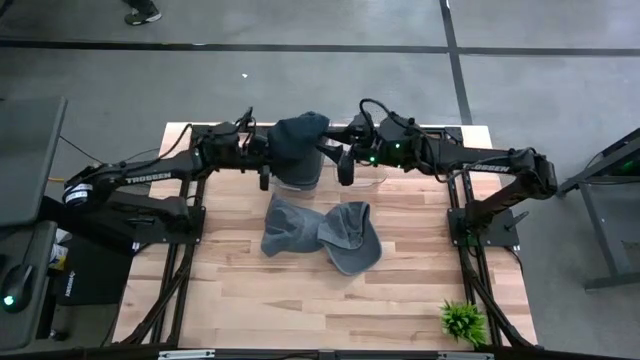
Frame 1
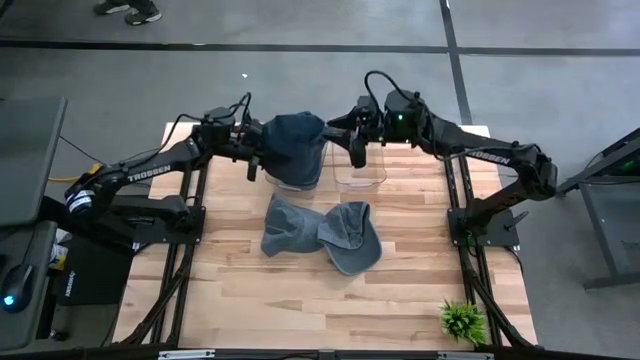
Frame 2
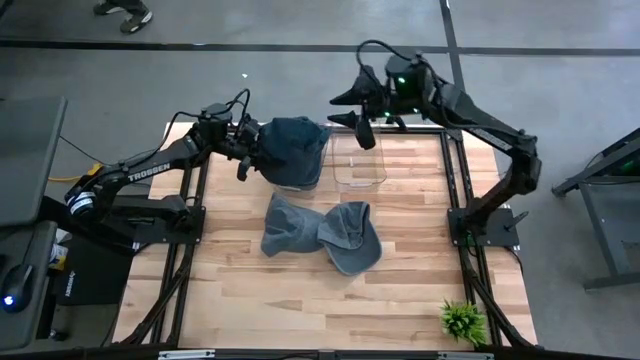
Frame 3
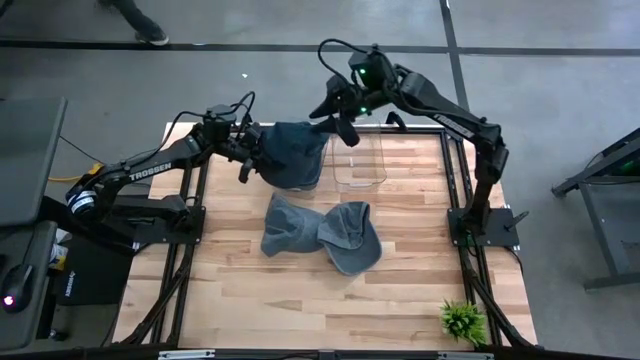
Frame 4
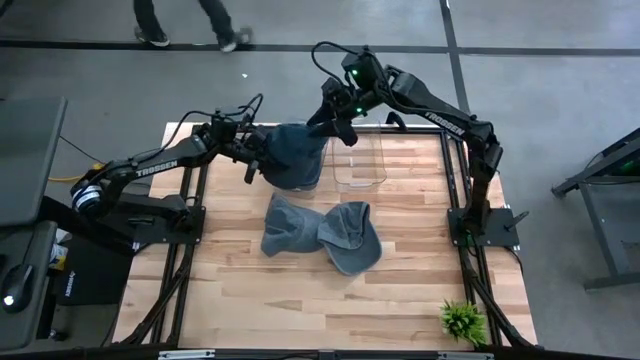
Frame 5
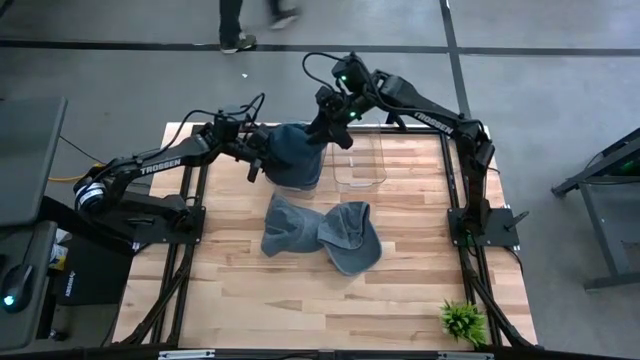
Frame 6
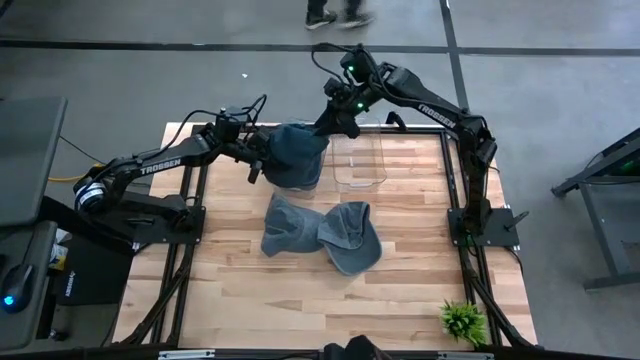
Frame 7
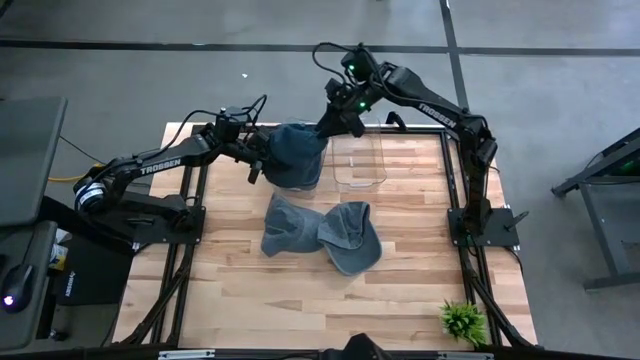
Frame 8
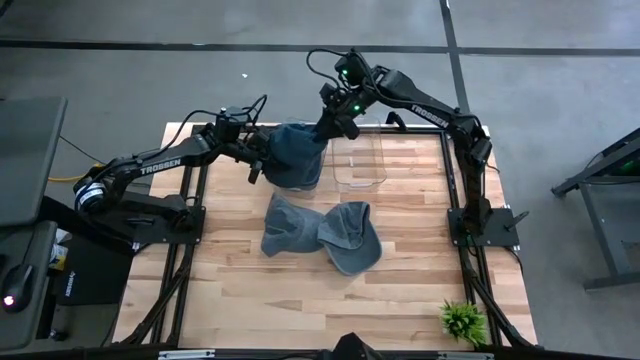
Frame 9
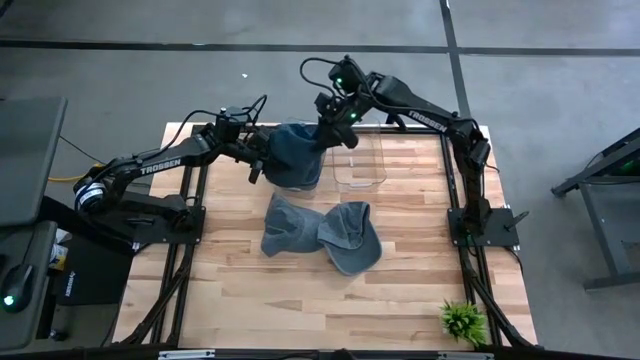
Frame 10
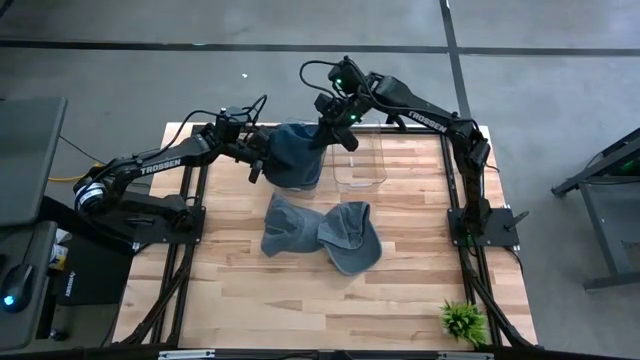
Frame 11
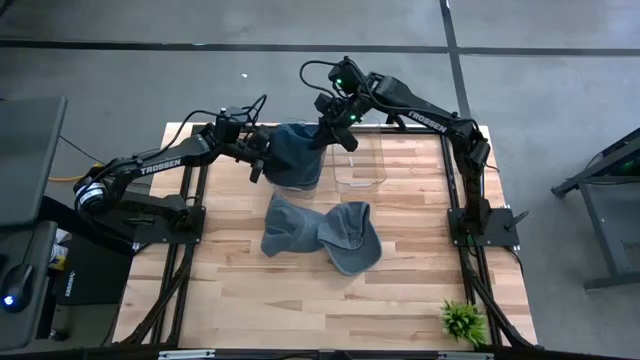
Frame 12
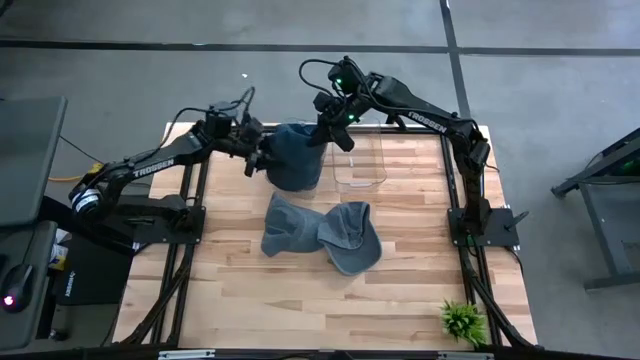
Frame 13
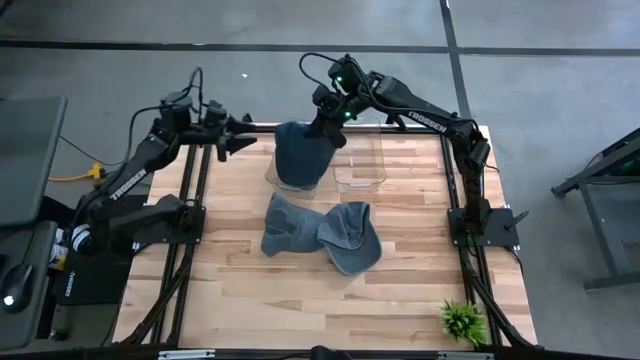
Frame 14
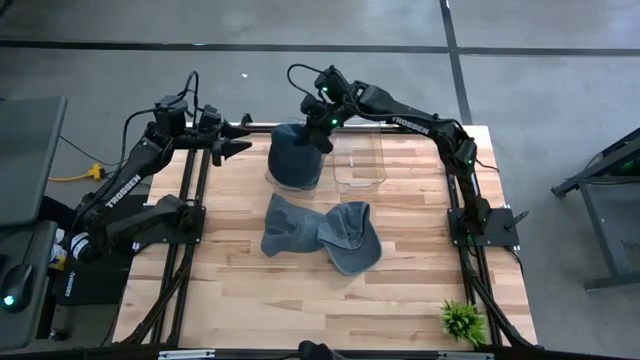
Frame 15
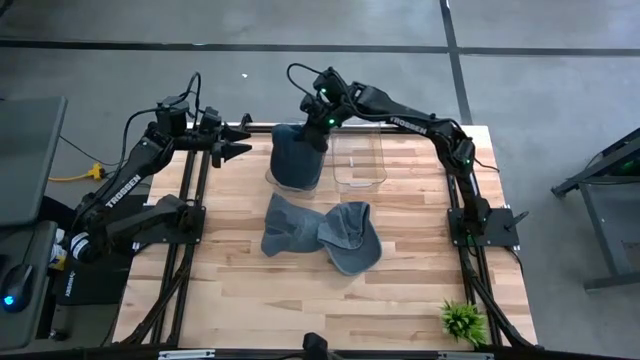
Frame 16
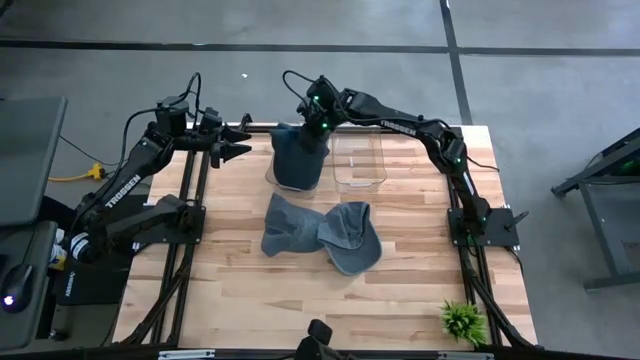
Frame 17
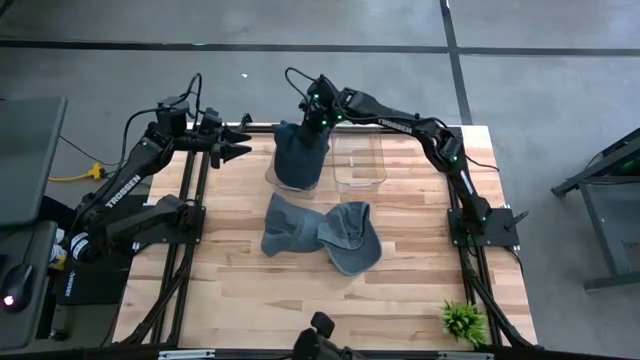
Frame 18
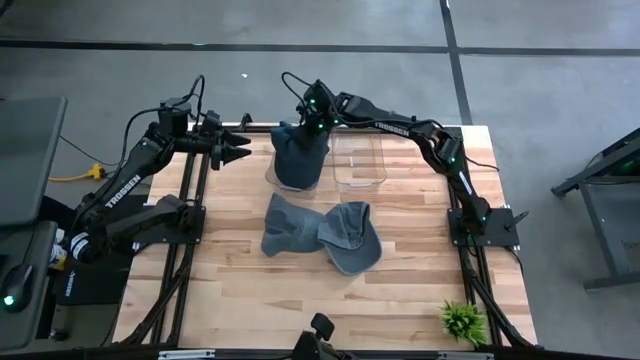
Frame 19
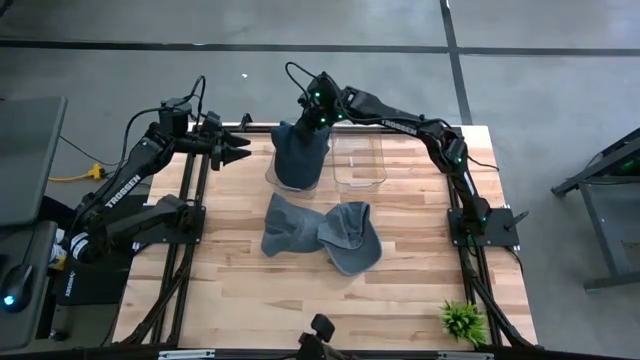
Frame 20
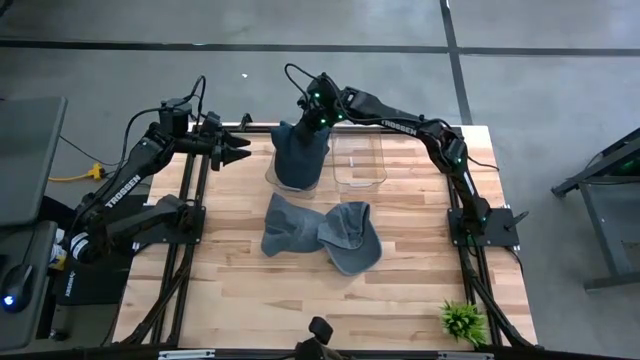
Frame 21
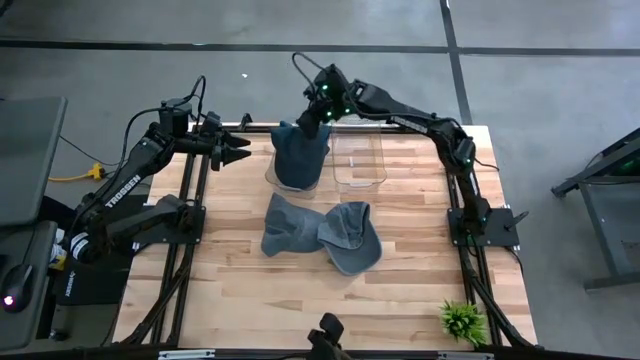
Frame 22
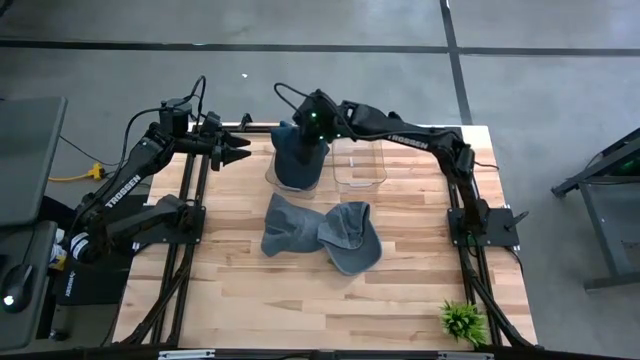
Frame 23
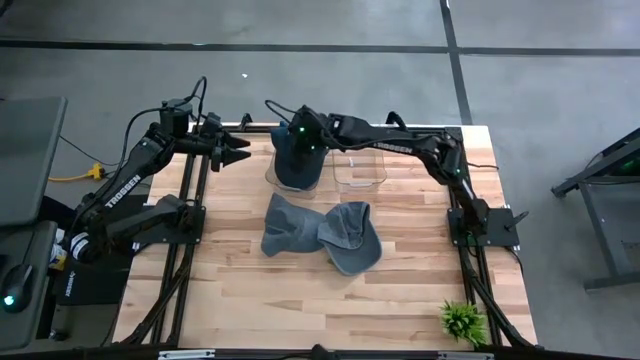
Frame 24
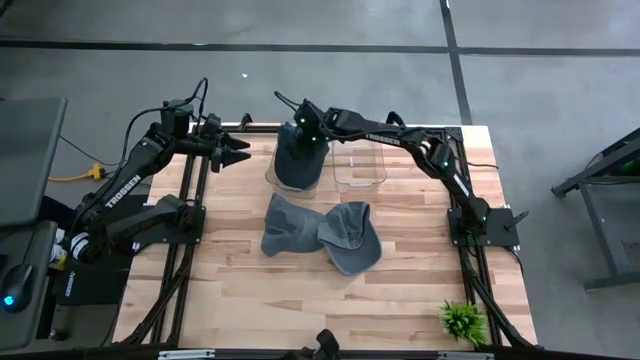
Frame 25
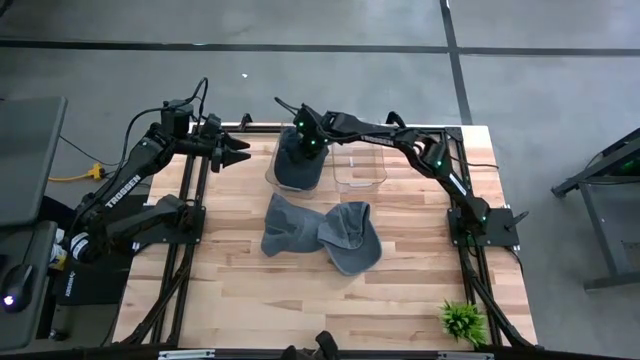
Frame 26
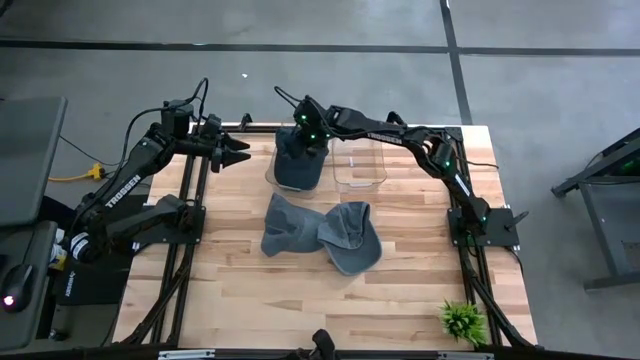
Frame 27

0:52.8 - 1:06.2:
Task: Pick & Place hat
Put the blue cap into the left transparent bin

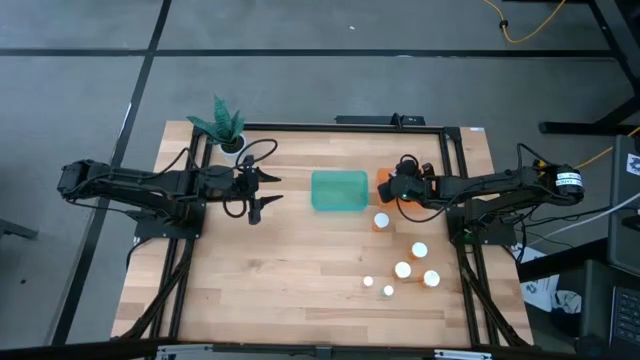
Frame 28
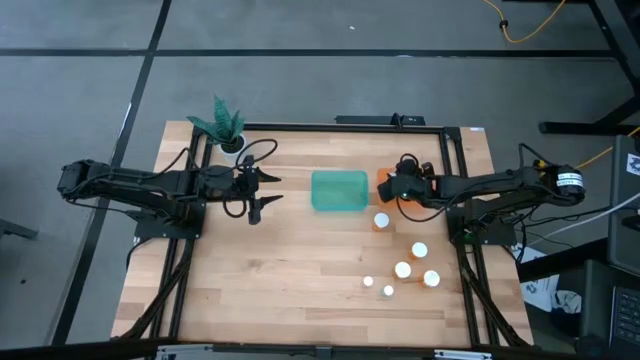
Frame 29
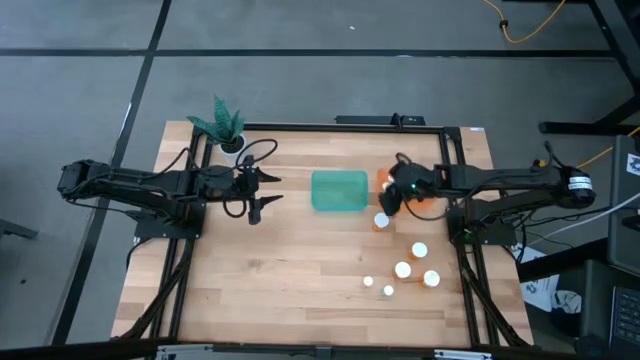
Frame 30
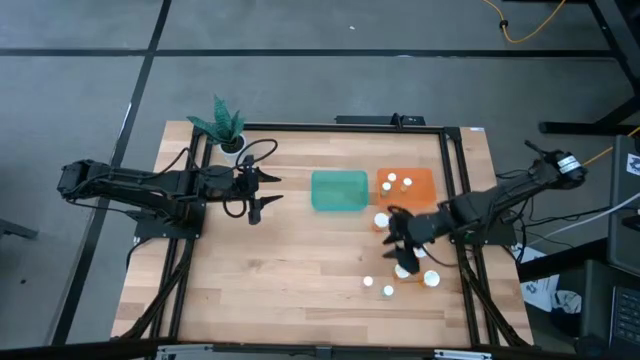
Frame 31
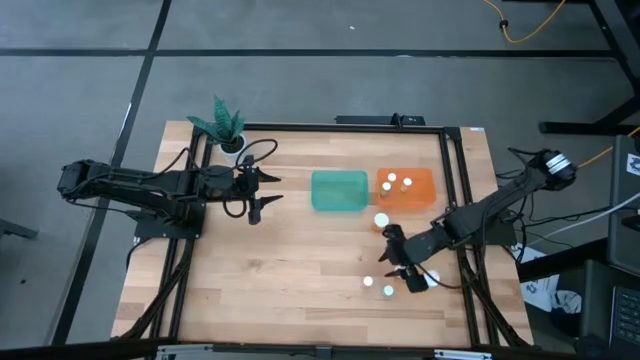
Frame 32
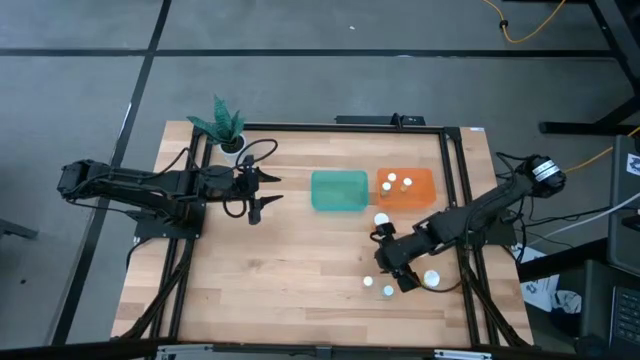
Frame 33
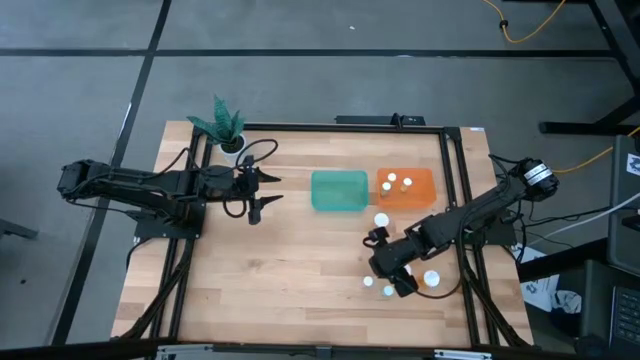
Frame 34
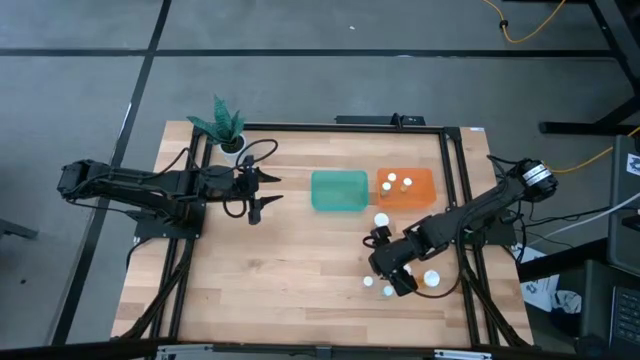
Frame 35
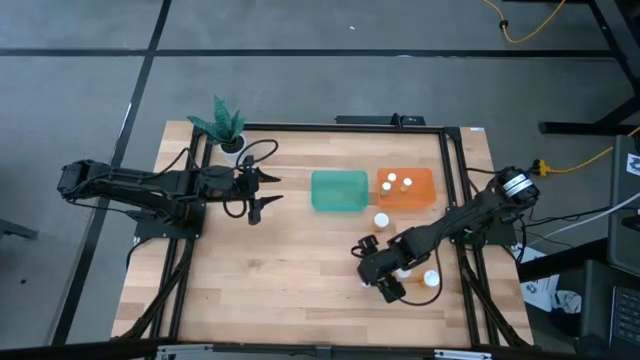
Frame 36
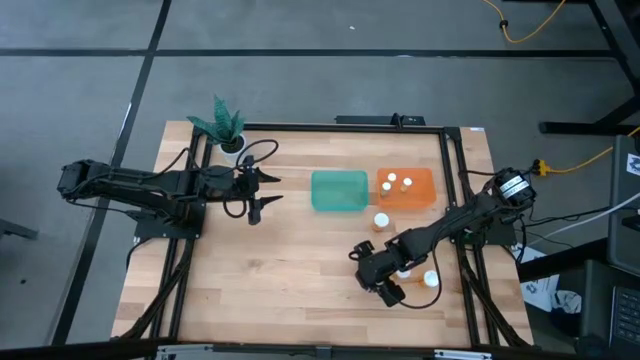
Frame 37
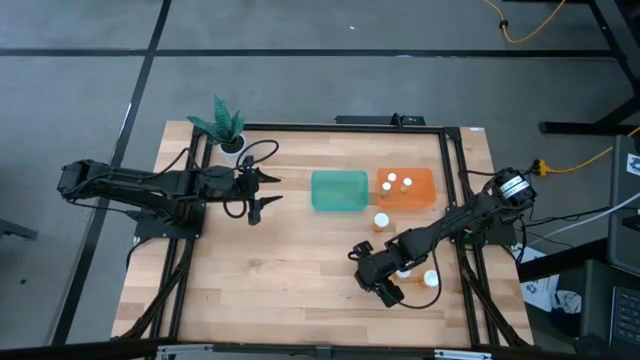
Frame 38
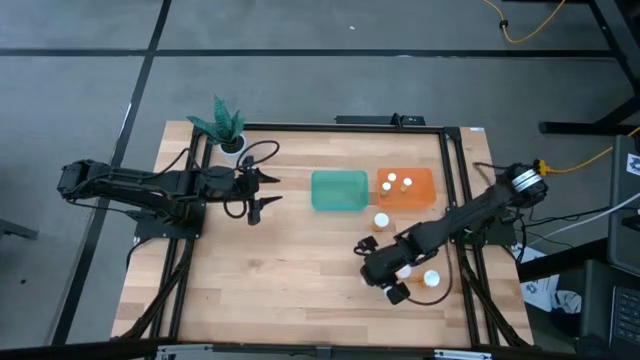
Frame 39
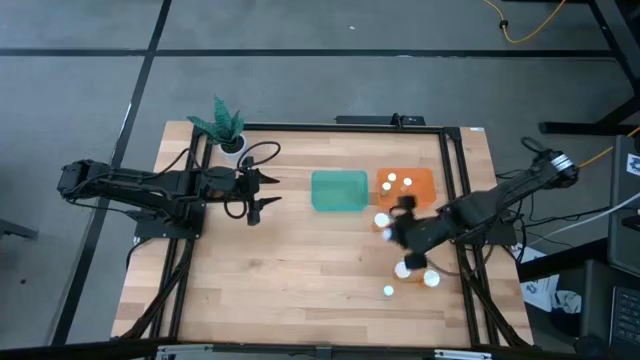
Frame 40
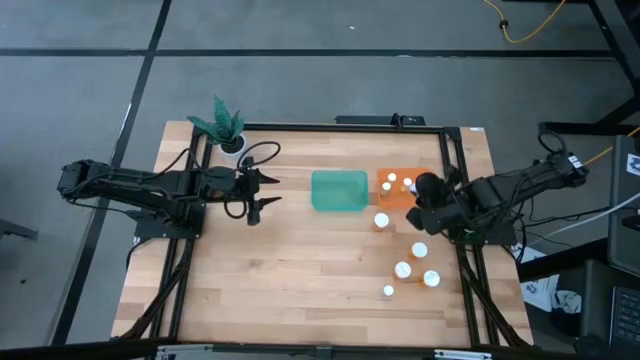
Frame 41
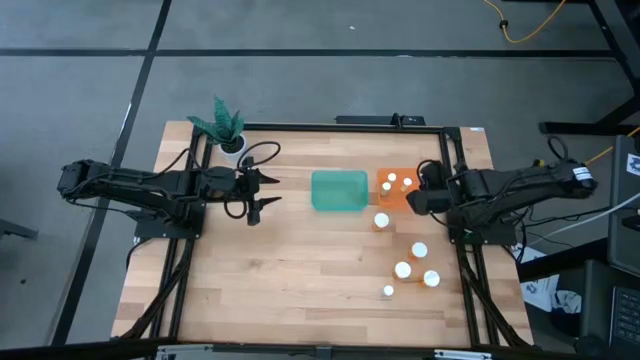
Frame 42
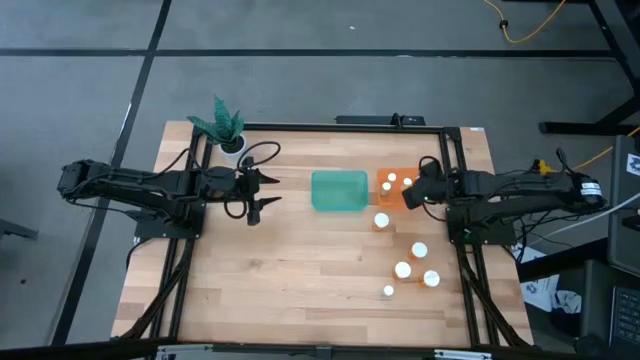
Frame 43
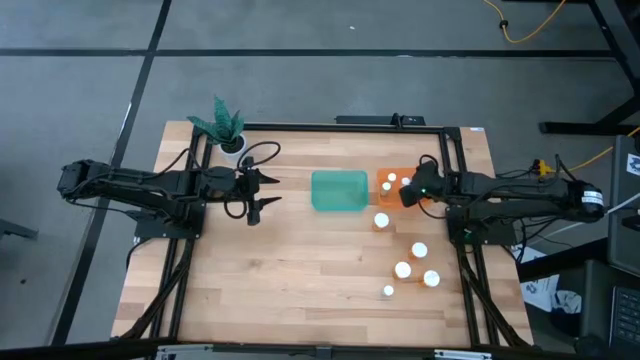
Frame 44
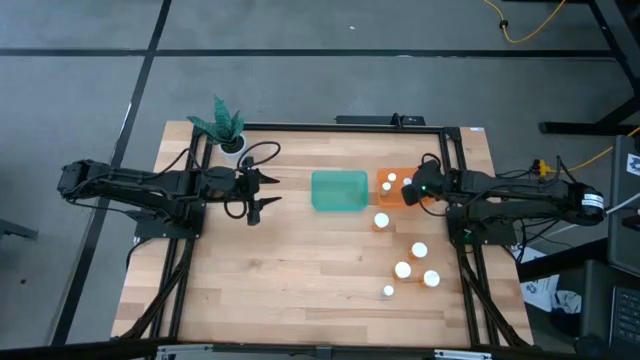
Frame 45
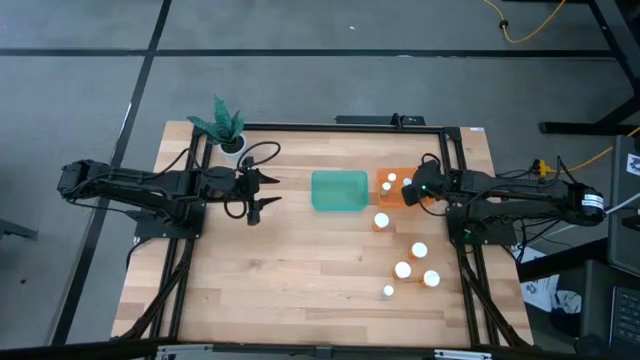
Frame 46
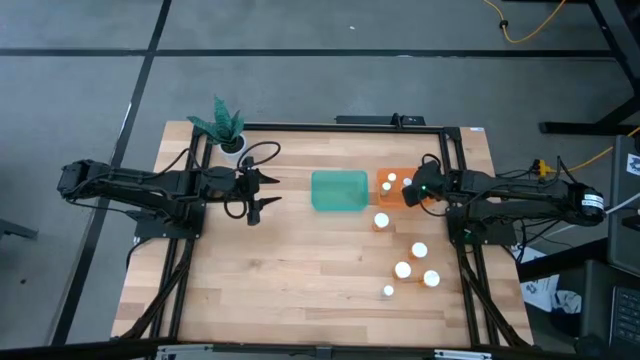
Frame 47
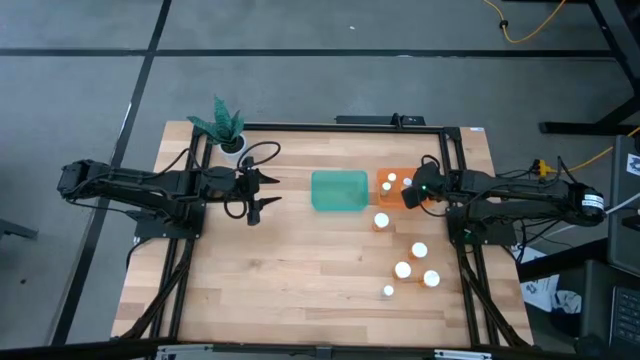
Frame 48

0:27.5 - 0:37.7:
Task: Pick and place medicine bottles into bin by pill shape (circle, oval)
Put the pink pill bottle into the orange bin
